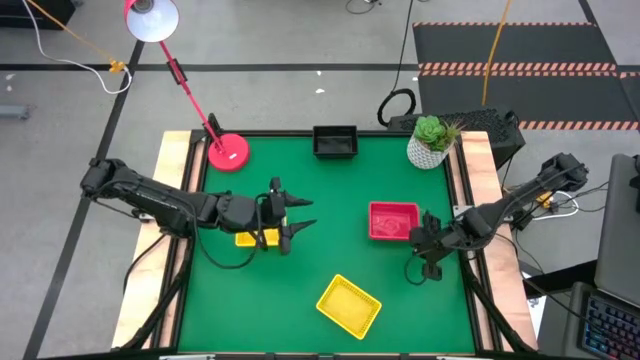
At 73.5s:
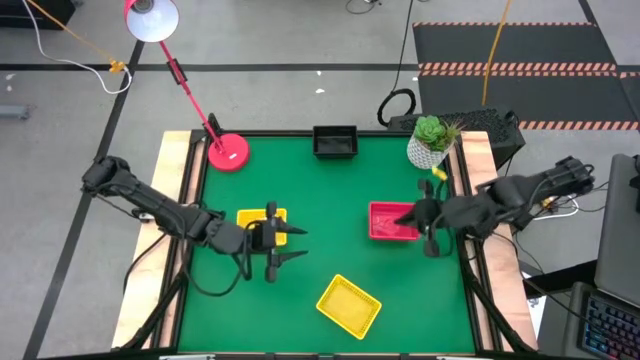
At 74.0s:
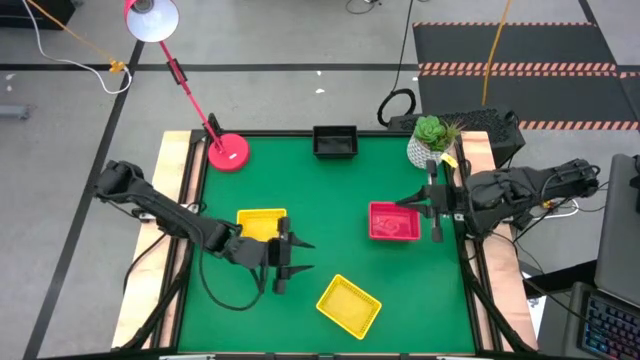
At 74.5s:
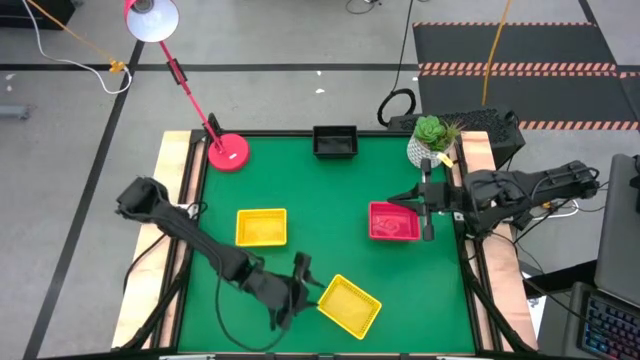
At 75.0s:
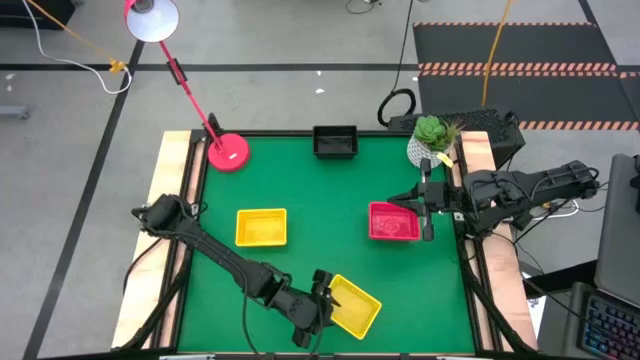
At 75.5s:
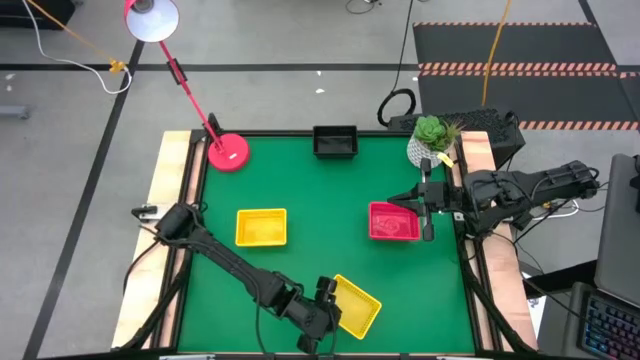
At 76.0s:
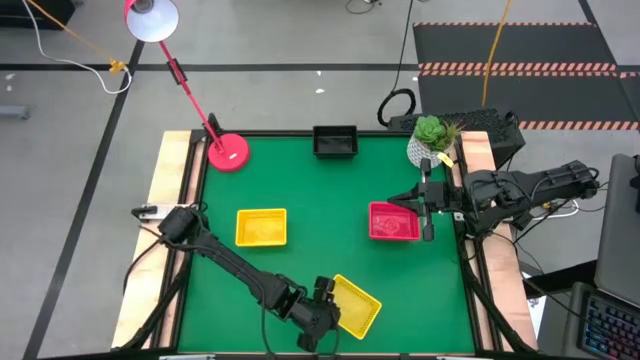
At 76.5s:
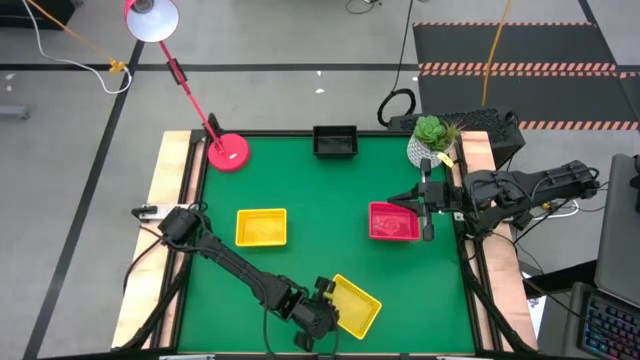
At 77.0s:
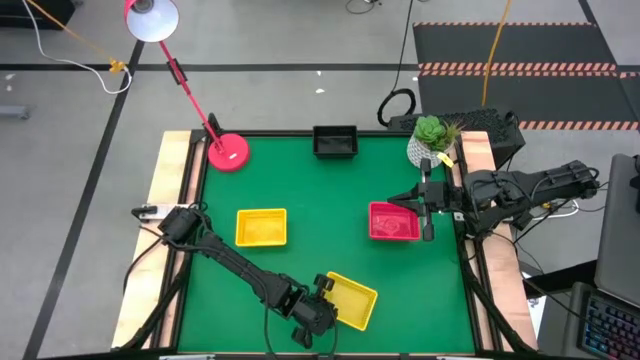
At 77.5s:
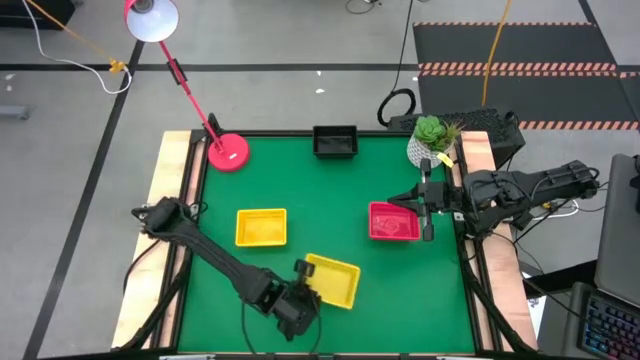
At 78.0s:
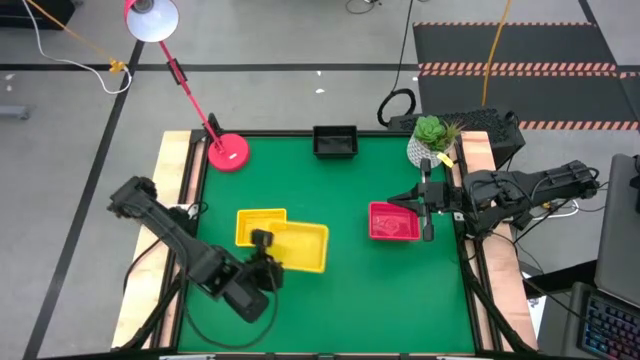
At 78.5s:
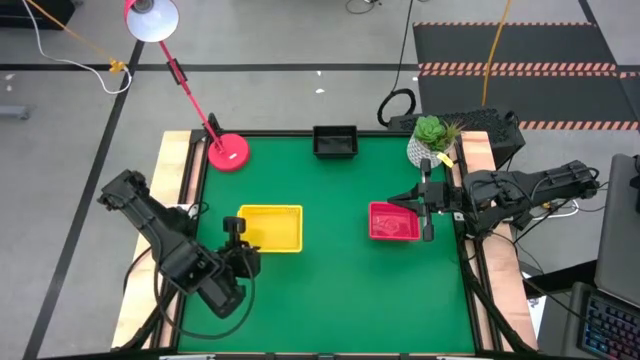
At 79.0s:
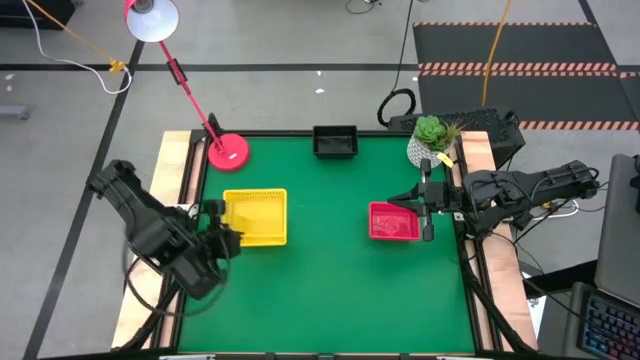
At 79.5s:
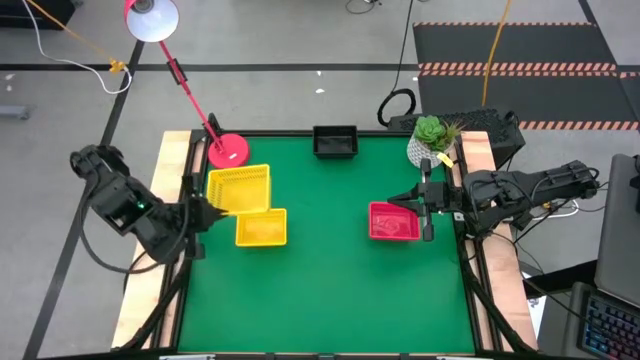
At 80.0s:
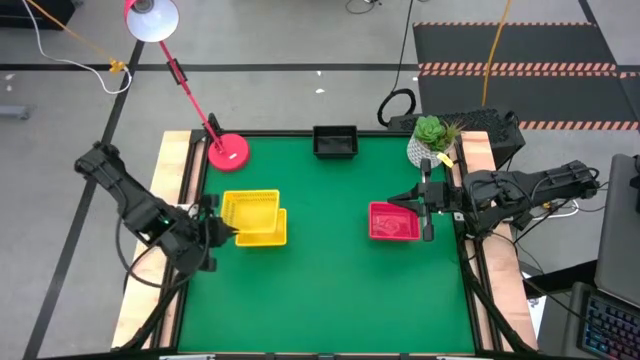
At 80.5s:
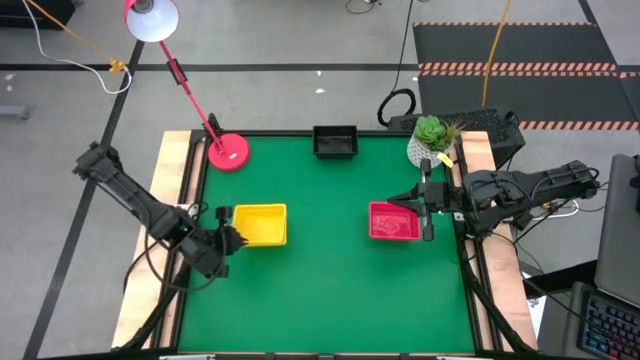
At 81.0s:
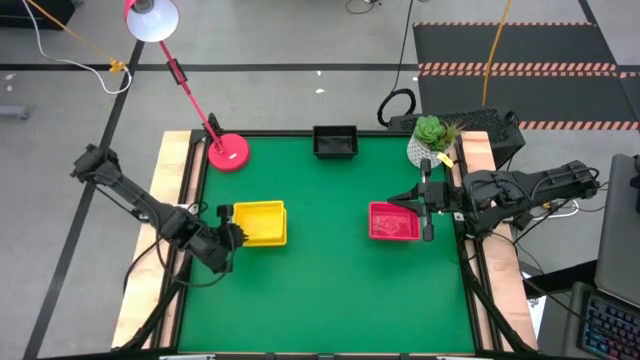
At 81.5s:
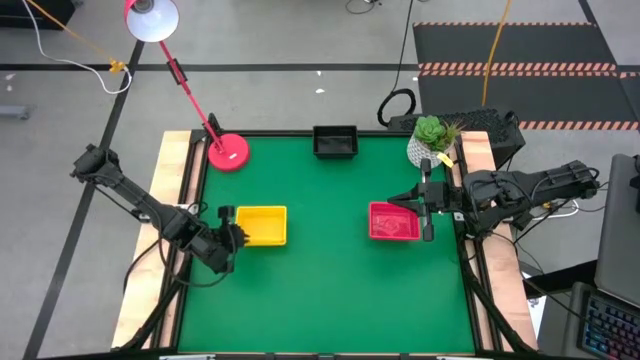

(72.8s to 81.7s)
Stack the bottom yellow bin on the top stacked yellow bins

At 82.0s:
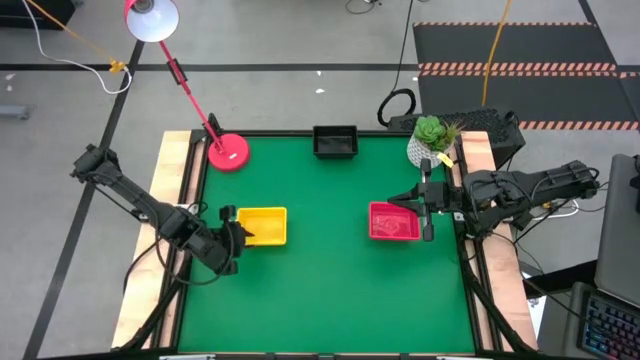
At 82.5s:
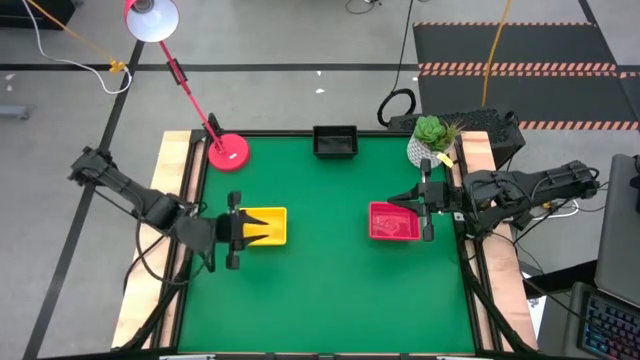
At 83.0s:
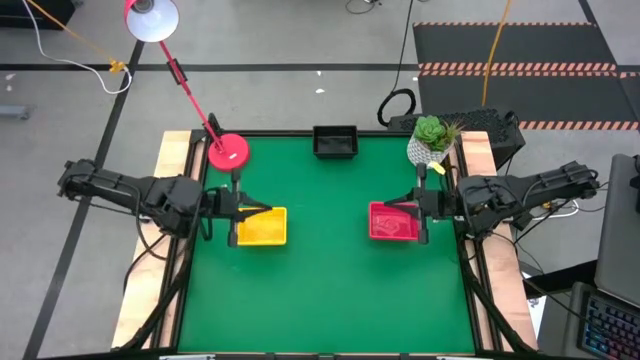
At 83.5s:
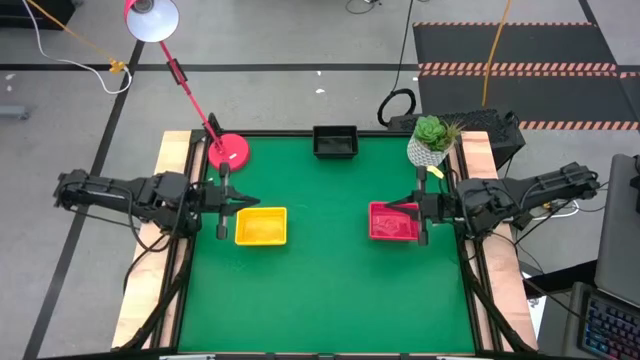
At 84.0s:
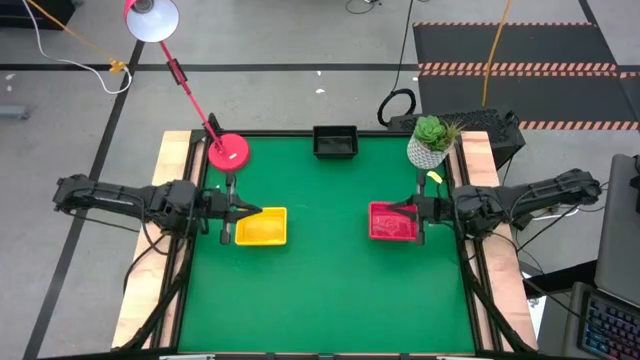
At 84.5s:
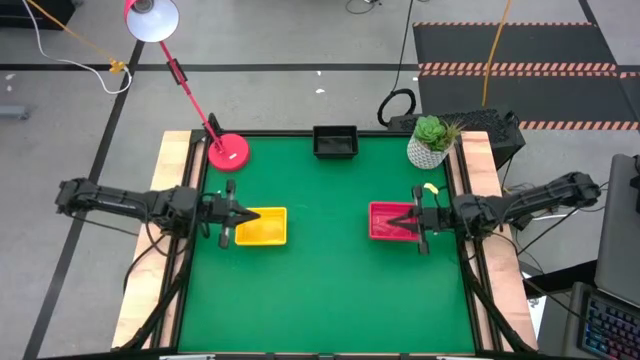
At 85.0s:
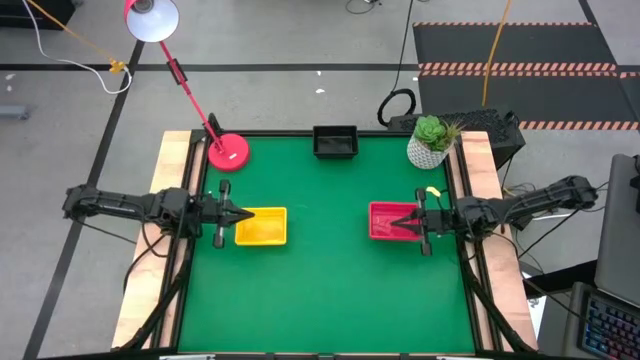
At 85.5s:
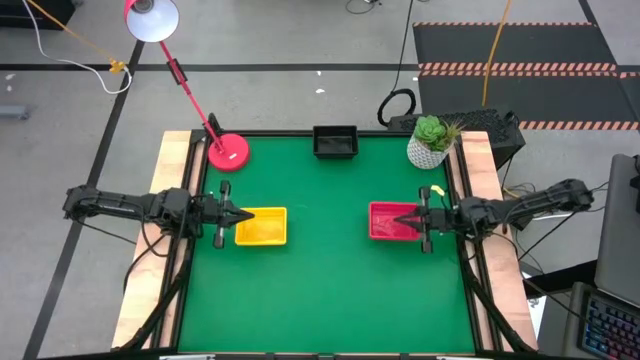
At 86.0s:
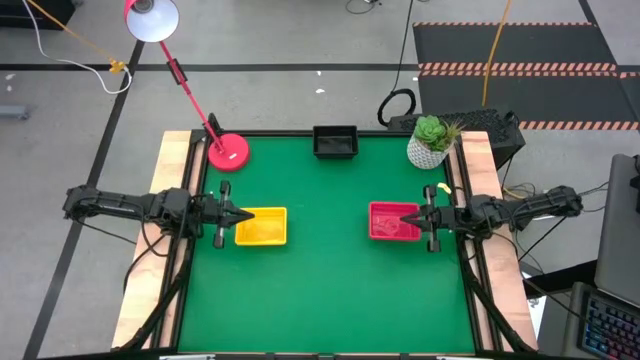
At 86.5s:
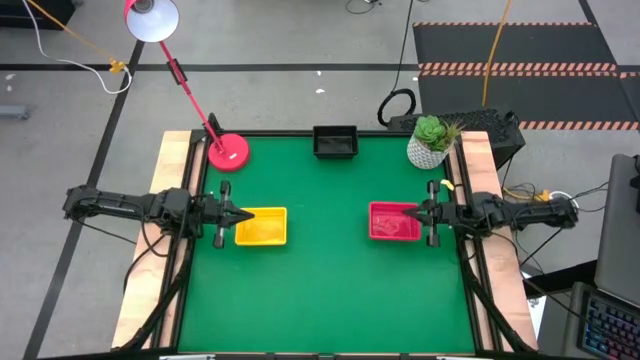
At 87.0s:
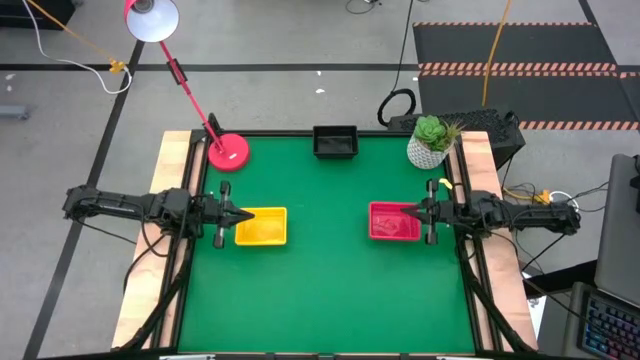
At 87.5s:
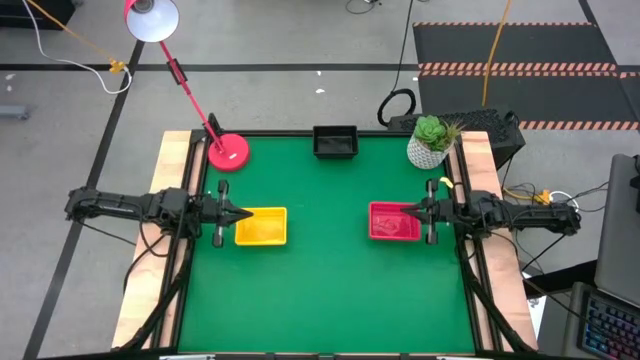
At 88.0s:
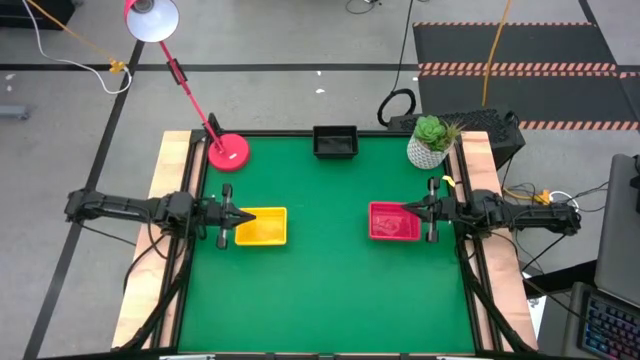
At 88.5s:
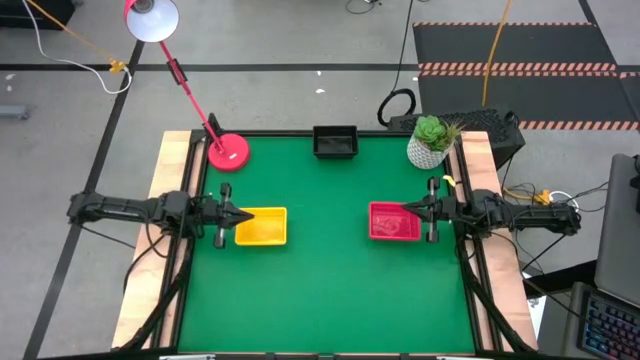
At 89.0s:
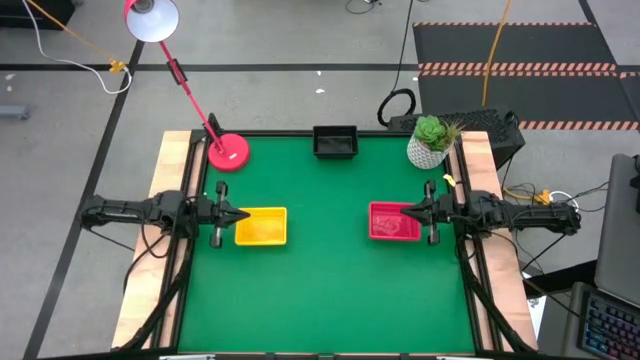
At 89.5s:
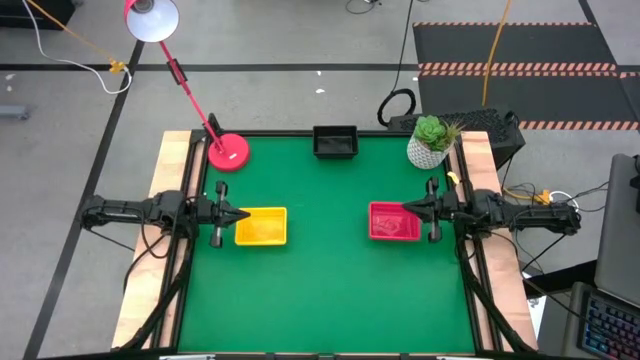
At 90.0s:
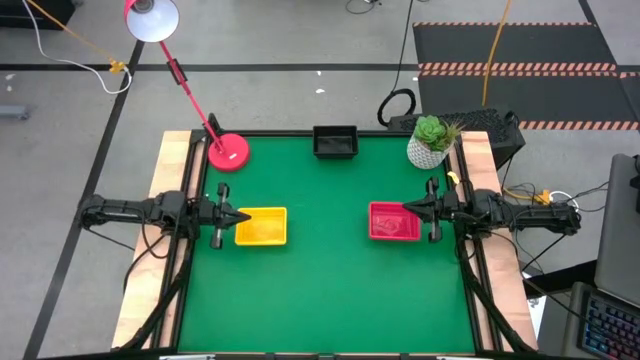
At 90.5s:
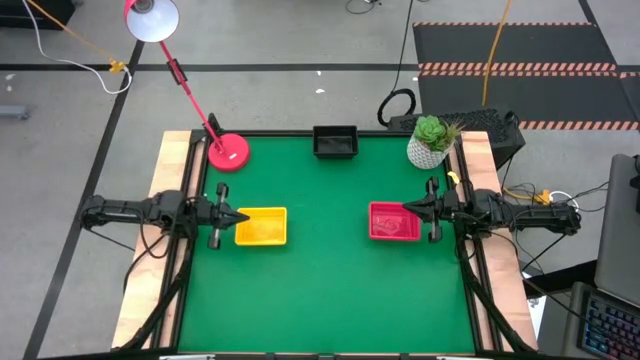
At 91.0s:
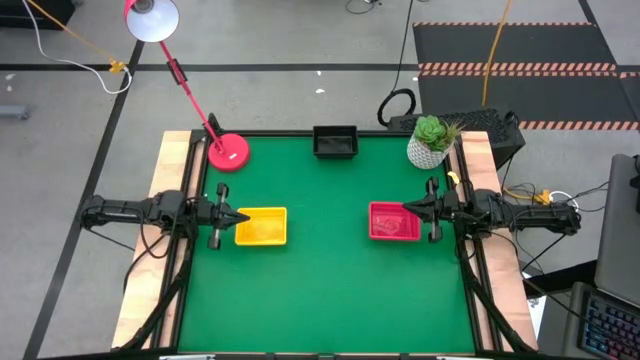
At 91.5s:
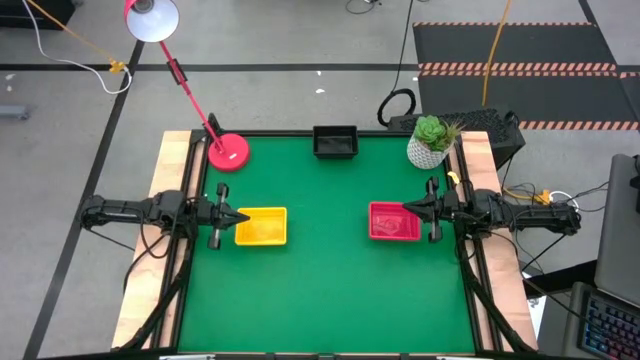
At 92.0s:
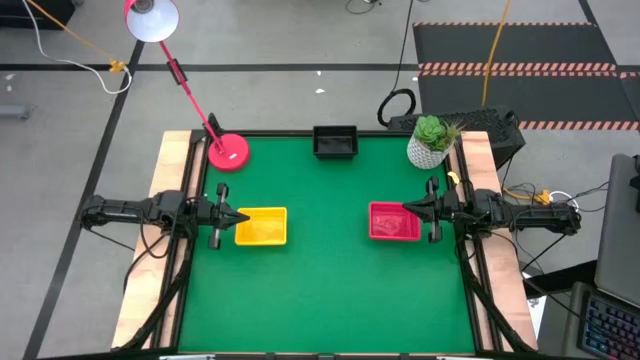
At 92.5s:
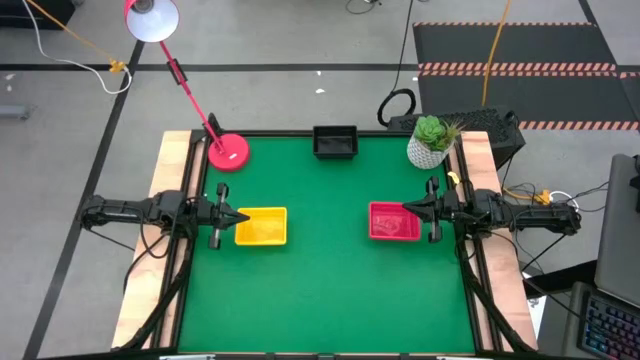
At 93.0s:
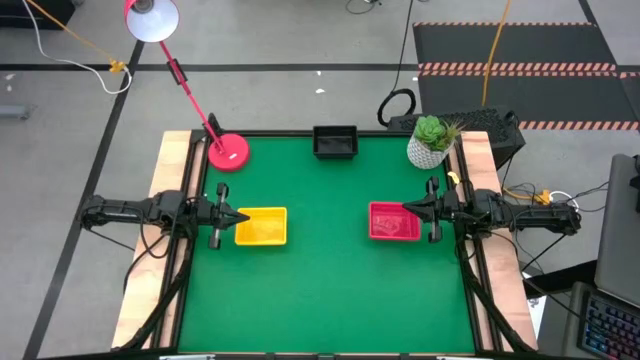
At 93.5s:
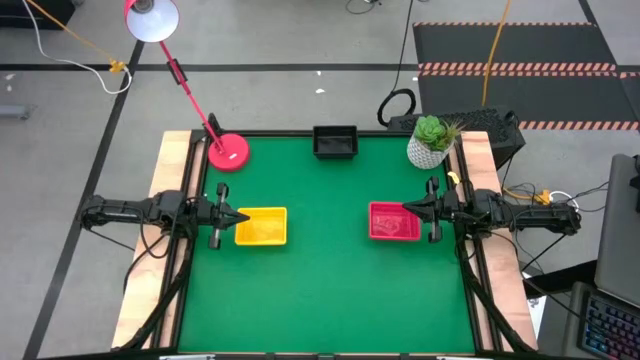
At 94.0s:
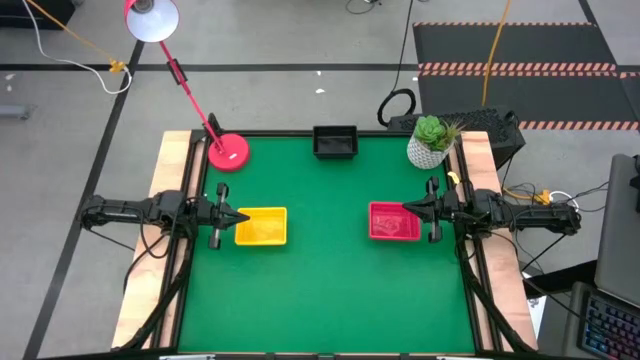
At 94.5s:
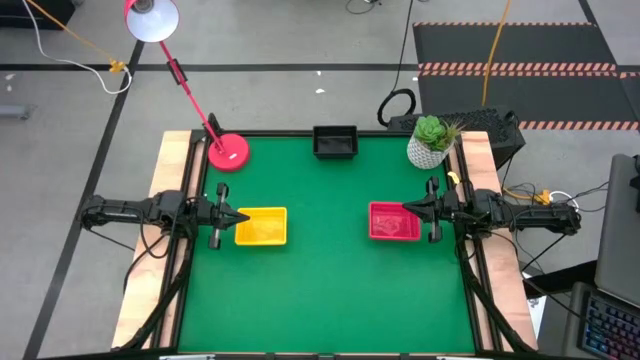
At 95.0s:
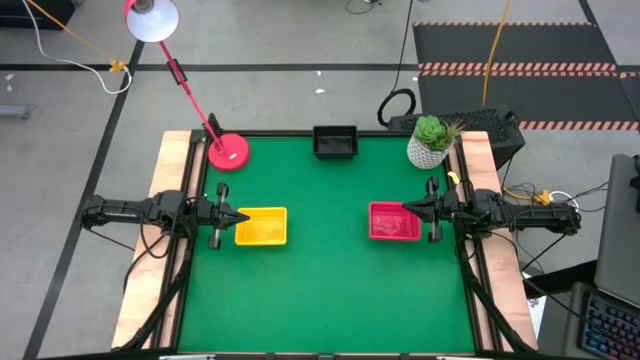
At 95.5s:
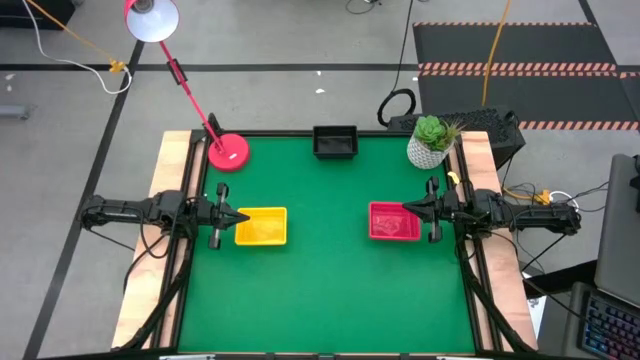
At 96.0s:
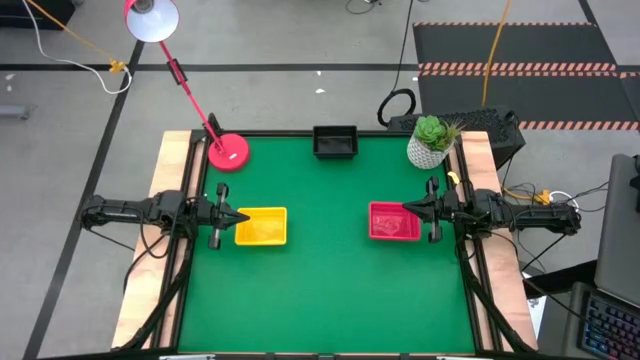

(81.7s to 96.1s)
Return to Home Position
